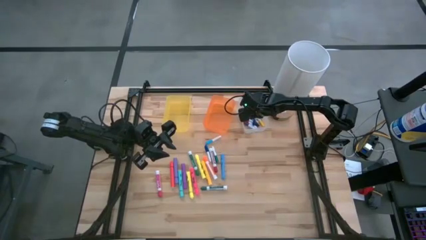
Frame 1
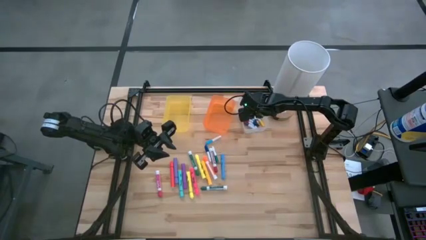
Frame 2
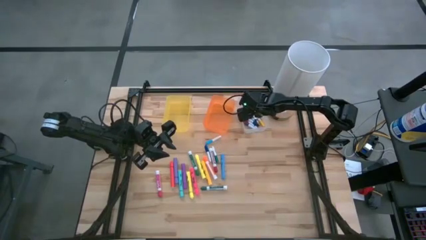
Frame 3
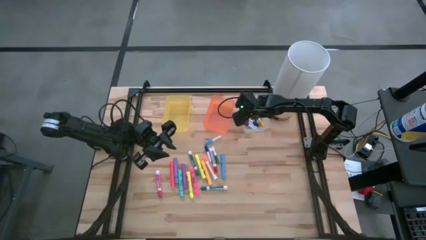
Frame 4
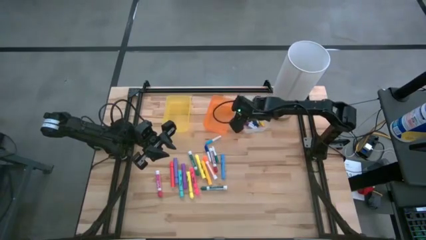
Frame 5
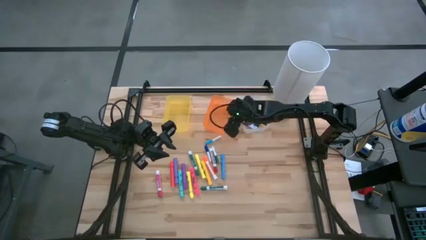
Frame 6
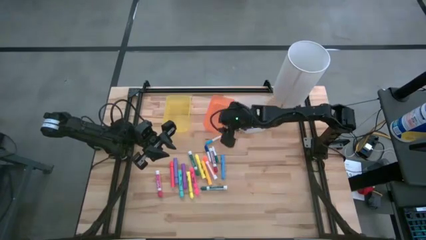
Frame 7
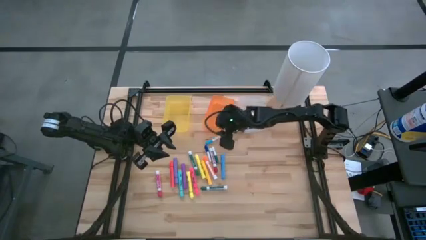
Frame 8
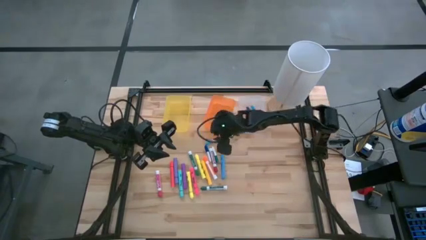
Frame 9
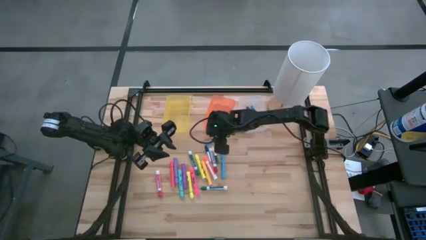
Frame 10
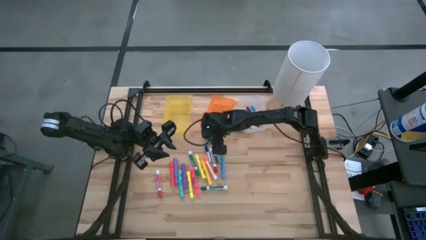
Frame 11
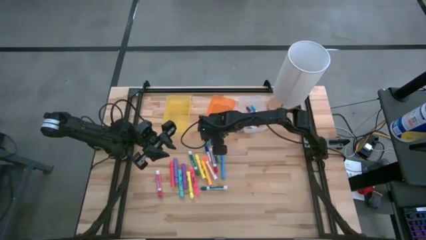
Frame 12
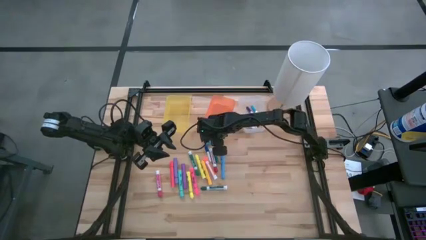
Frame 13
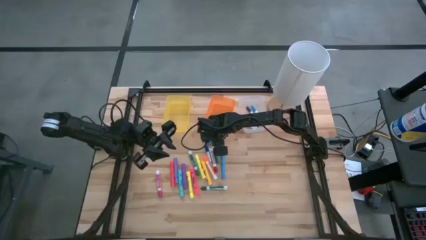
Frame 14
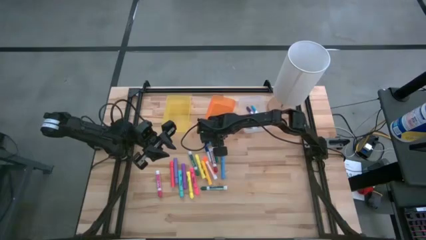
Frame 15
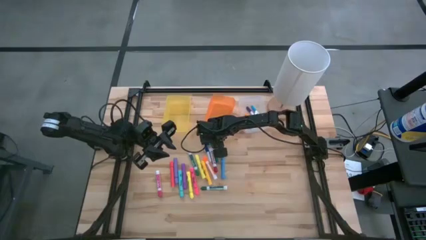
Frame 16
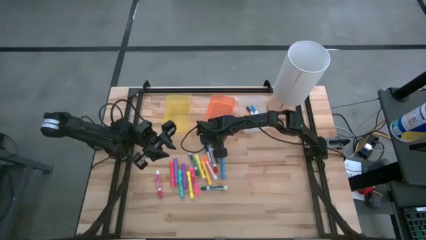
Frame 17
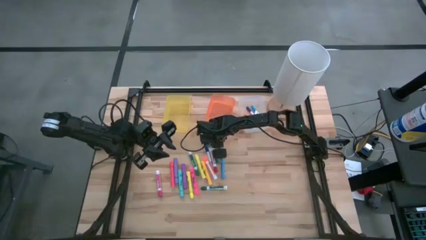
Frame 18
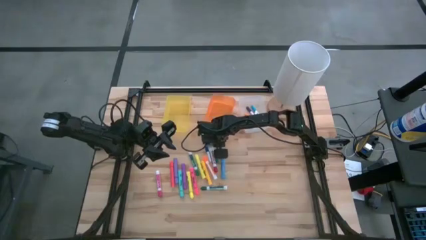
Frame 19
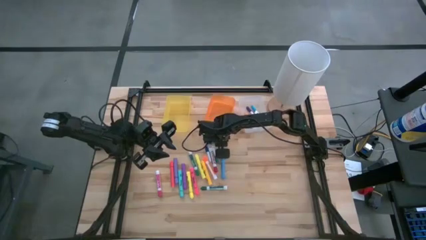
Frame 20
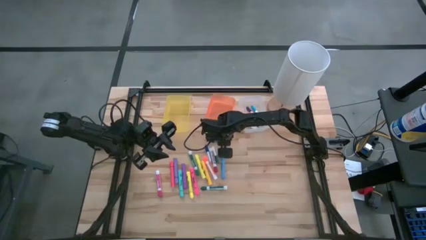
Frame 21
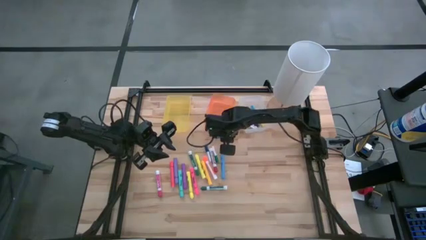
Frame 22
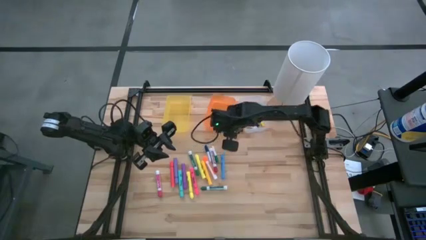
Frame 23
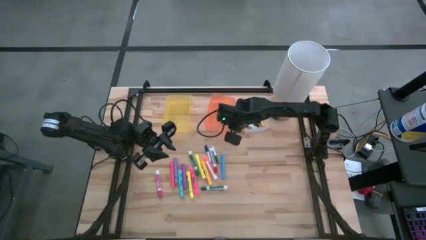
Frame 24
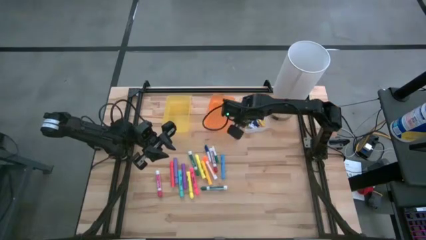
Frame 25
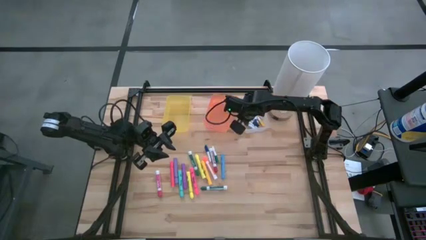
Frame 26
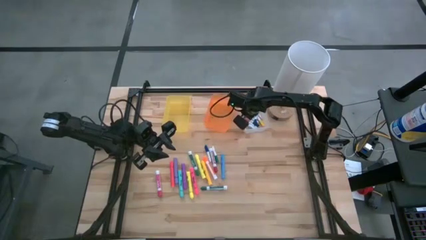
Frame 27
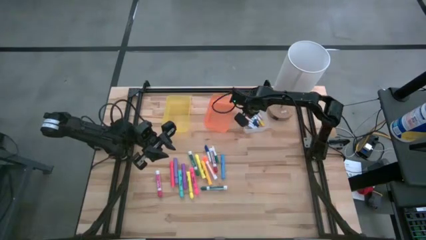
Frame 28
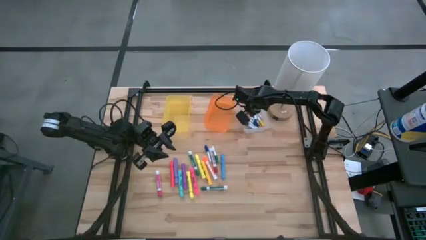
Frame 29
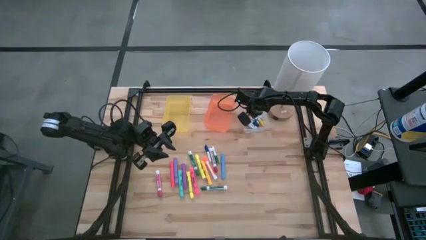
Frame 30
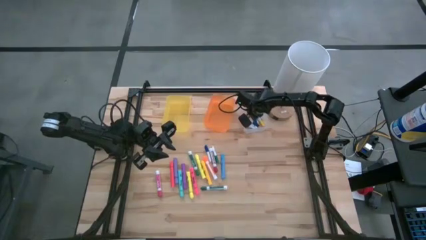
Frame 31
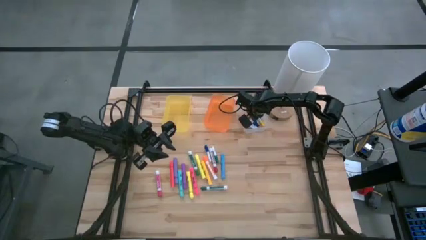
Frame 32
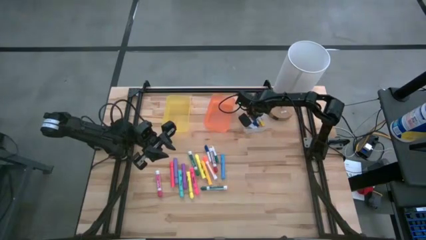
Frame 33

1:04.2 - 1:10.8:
Task: Pick & Place Markers
Put the light blue mini marker into the white bin

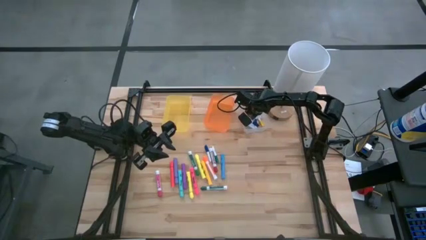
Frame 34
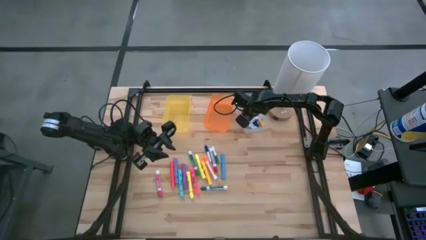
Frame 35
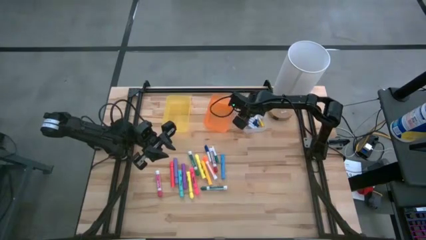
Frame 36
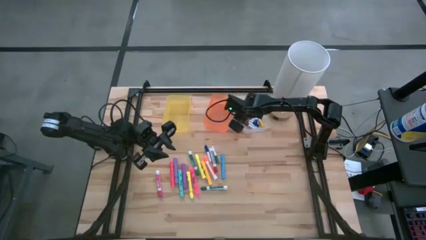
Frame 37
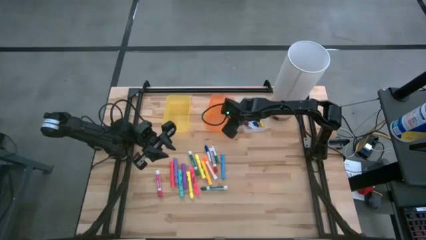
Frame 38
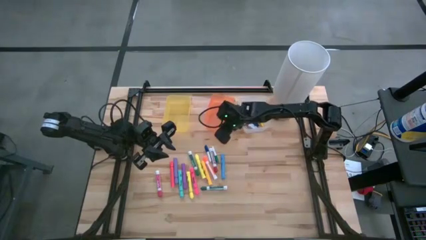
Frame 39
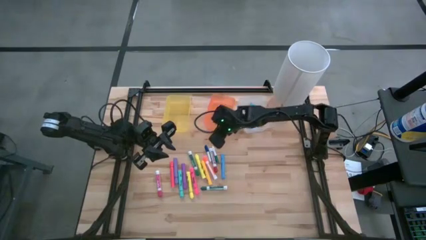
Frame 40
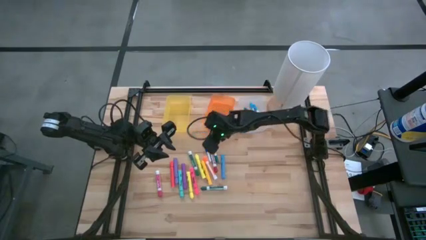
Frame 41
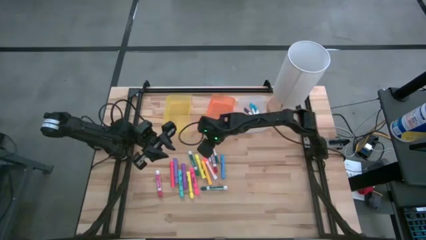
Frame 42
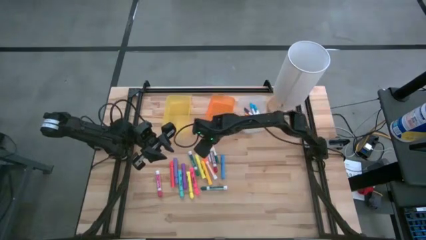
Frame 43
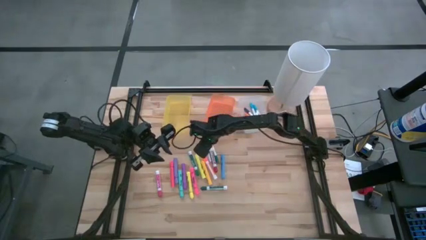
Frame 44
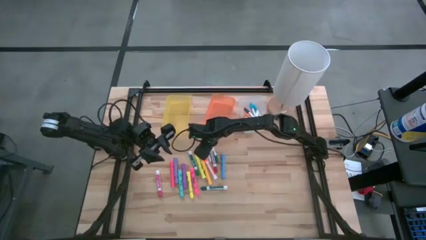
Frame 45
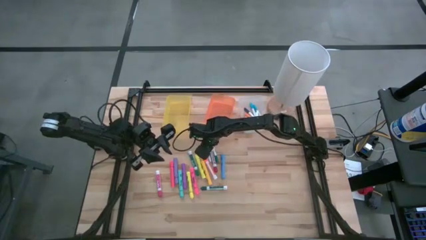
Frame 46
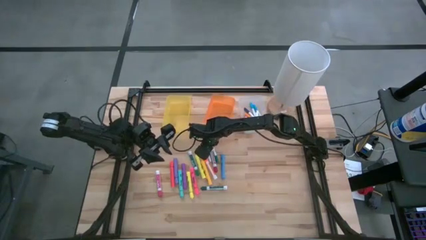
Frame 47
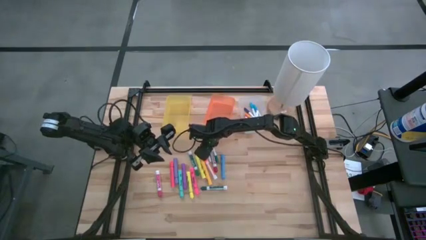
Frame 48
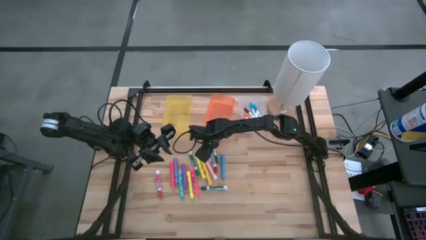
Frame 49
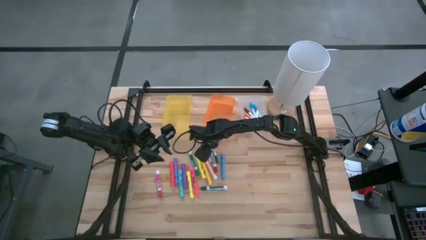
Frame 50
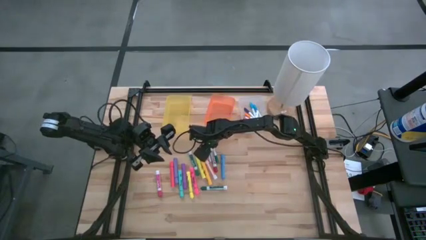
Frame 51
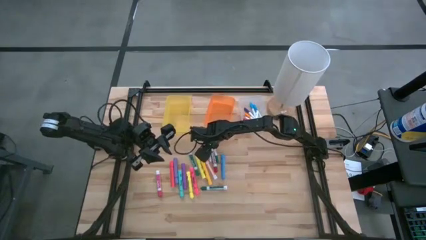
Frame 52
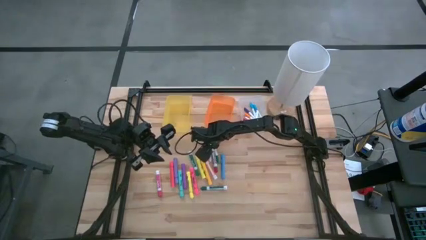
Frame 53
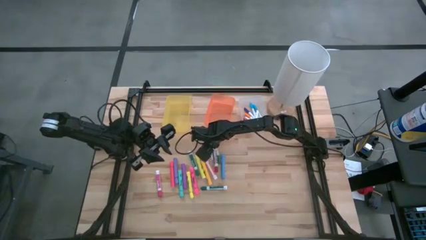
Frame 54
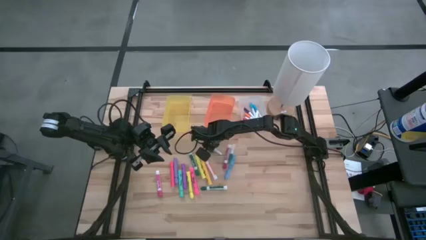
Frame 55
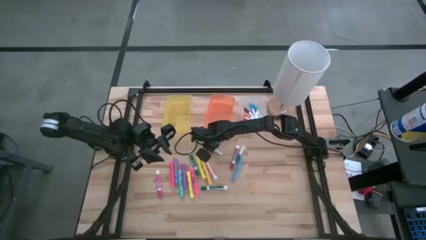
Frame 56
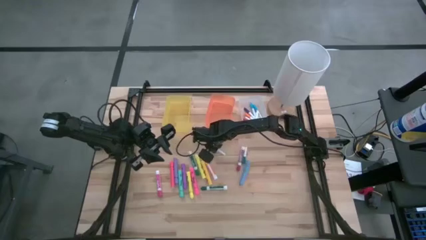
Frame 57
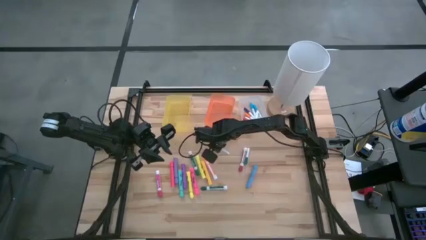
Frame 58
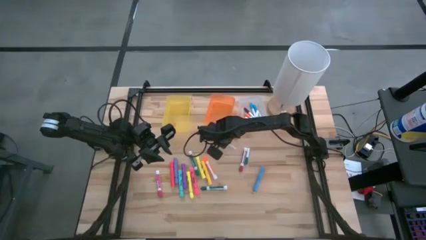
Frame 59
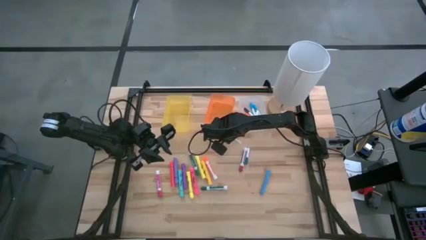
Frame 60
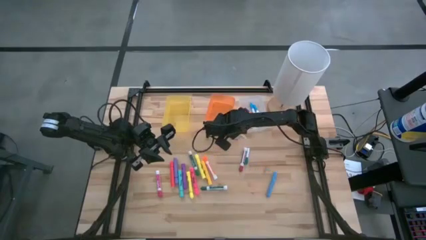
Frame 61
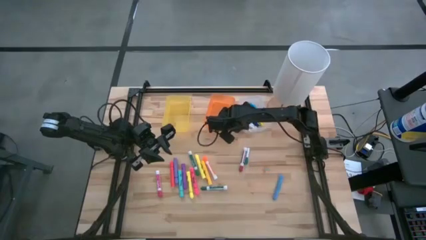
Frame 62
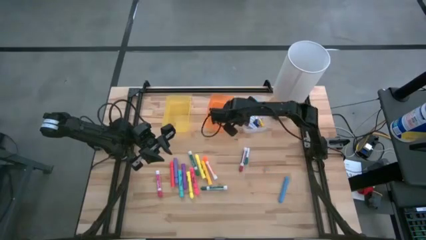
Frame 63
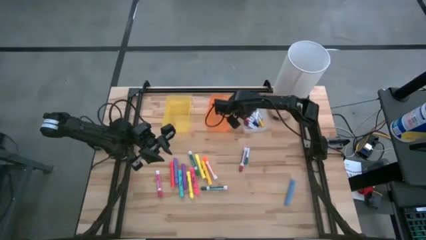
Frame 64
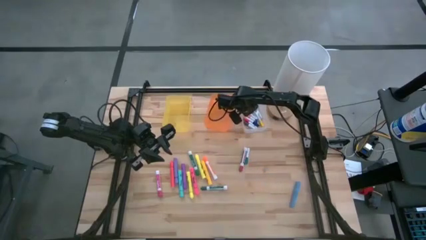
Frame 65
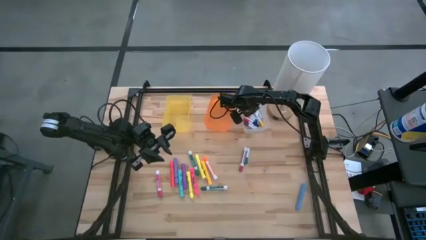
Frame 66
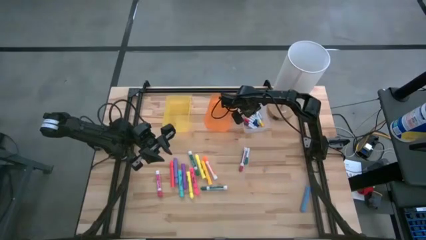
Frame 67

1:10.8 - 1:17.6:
Put the blue mini marker into the white bin

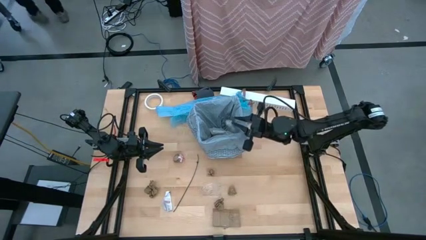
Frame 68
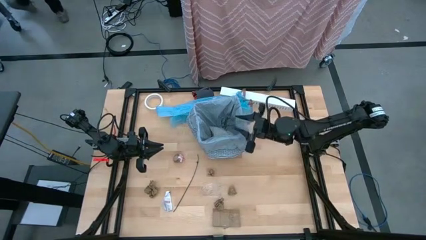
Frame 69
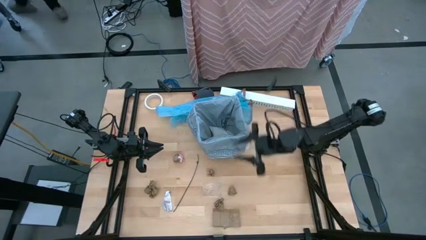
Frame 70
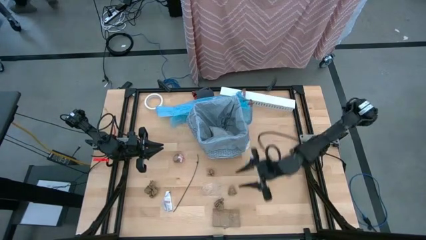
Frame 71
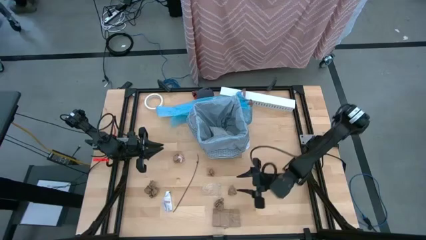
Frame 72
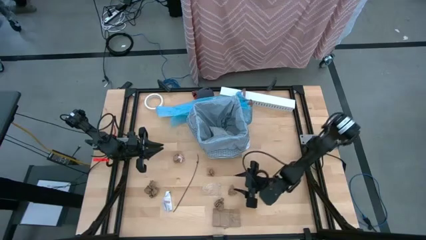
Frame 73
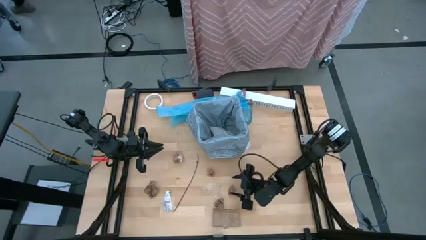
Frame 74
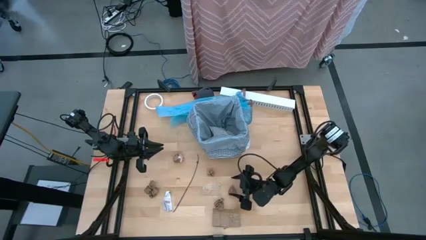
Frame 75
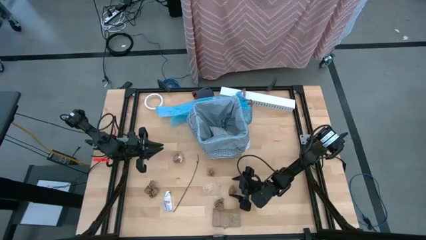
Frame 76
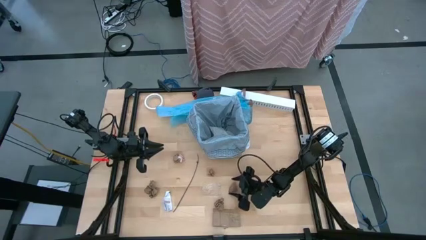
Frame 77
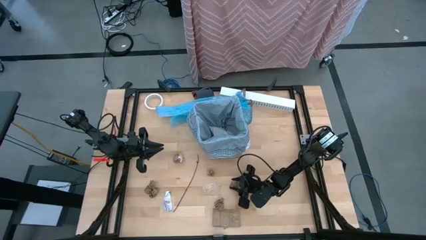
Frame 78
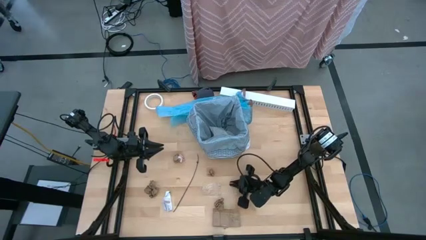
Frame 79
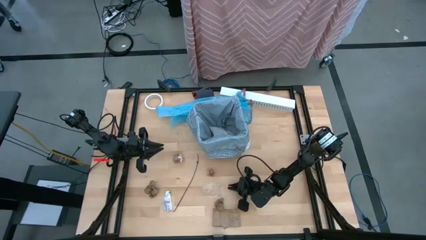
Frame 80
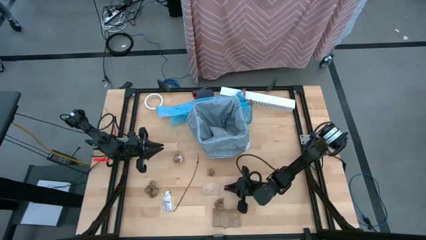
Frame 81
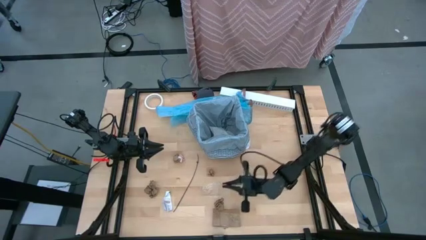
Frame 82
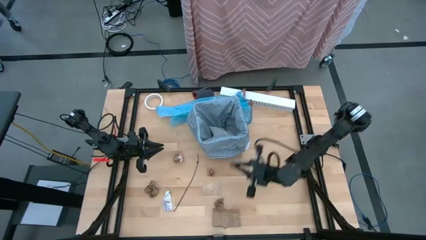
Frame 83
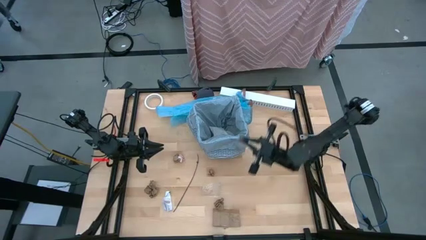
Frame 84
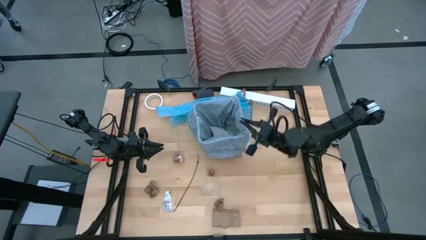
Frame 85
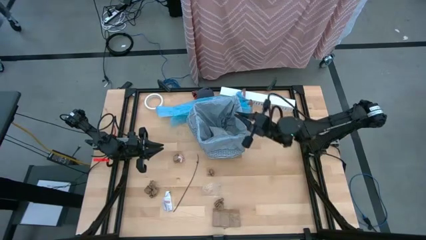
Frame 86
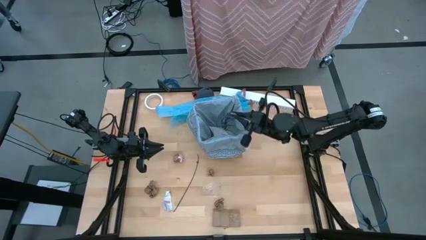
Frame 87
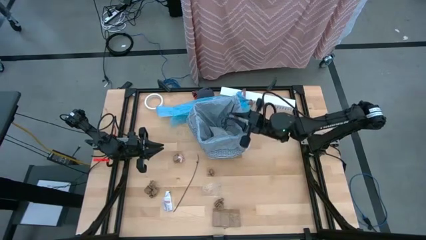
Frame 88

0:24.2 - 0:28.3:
Task: place trash/remove bag and relplace
Put the brown napkin inside the black trash bin
